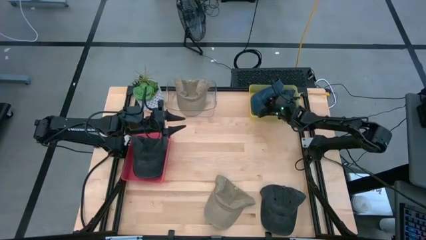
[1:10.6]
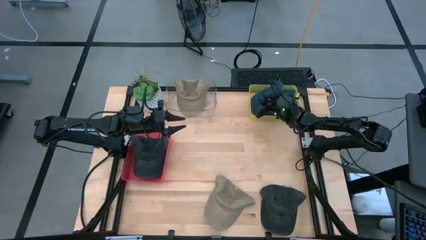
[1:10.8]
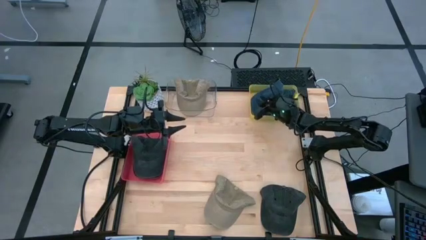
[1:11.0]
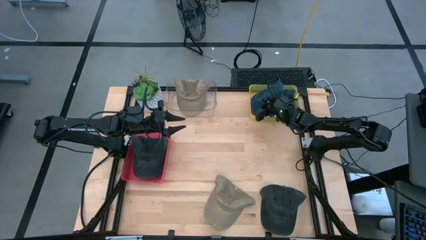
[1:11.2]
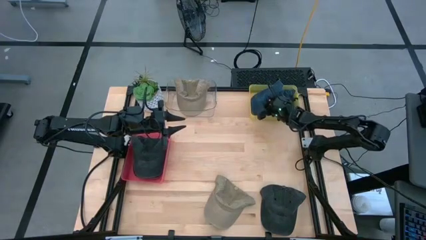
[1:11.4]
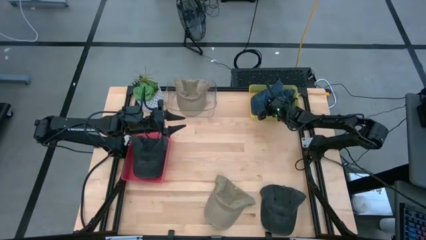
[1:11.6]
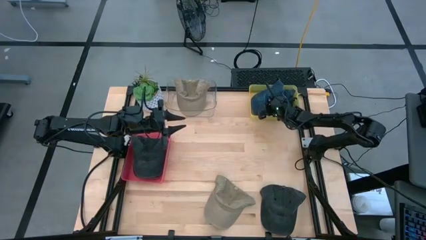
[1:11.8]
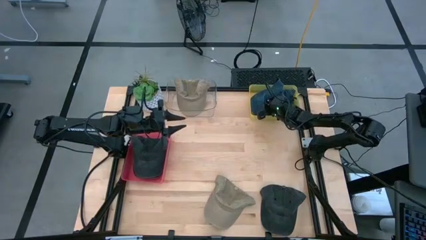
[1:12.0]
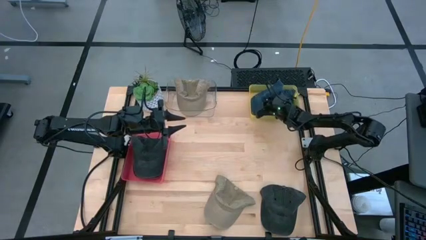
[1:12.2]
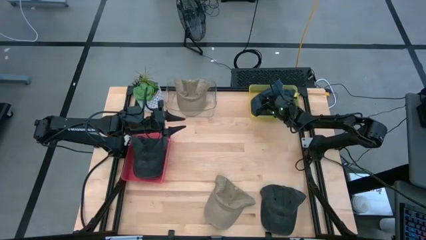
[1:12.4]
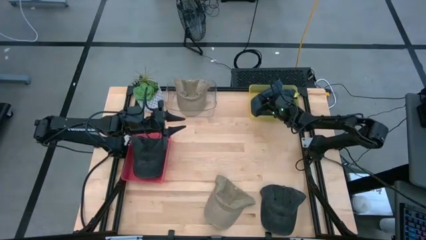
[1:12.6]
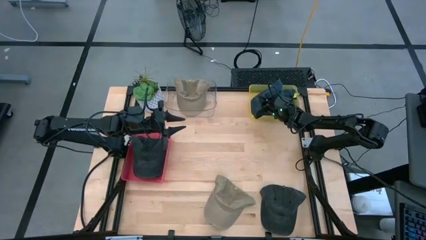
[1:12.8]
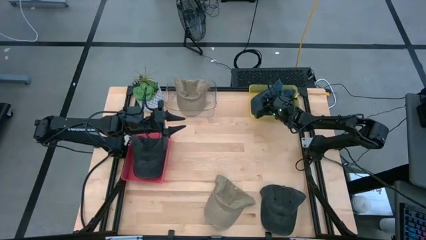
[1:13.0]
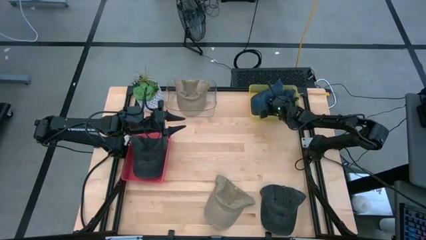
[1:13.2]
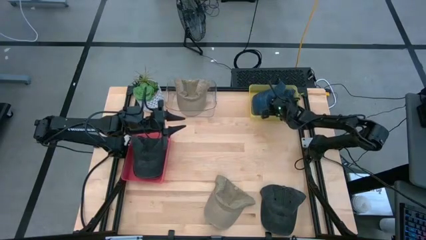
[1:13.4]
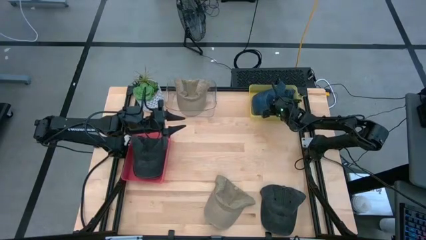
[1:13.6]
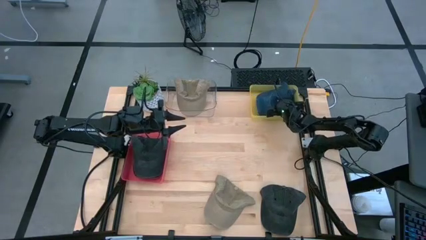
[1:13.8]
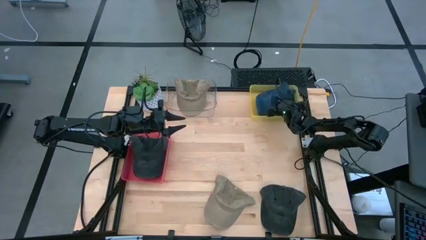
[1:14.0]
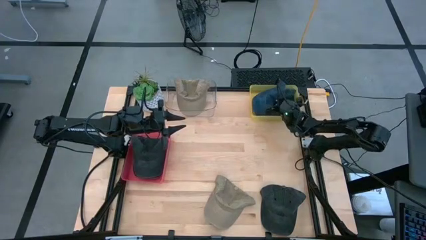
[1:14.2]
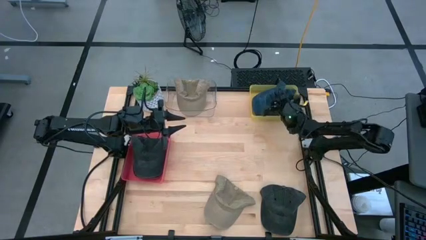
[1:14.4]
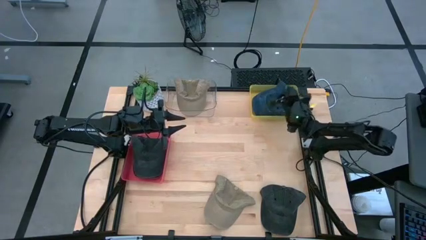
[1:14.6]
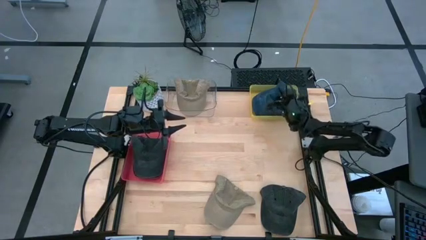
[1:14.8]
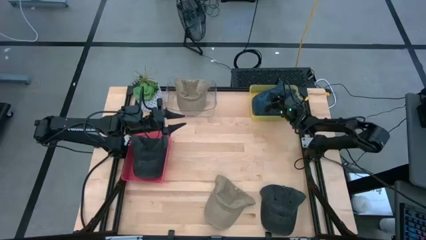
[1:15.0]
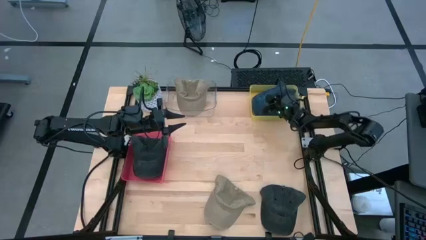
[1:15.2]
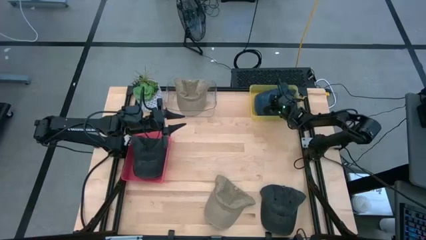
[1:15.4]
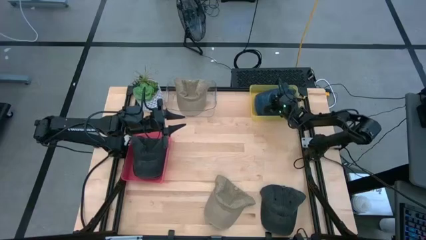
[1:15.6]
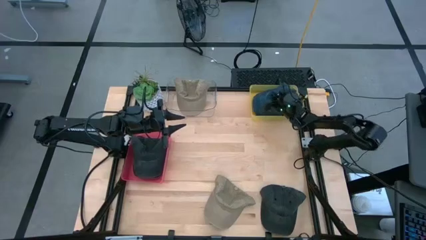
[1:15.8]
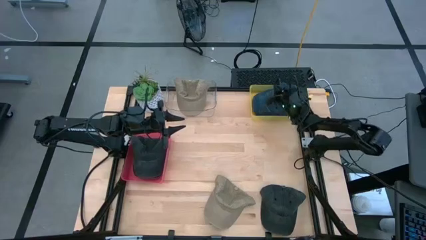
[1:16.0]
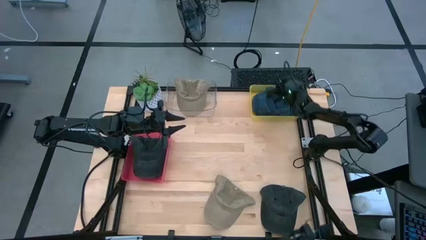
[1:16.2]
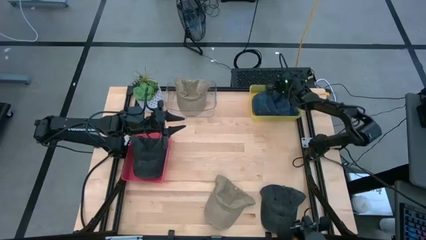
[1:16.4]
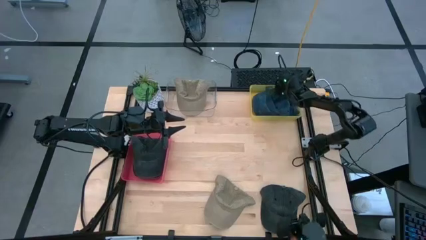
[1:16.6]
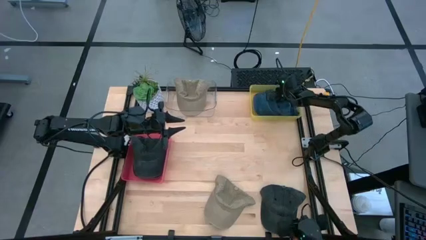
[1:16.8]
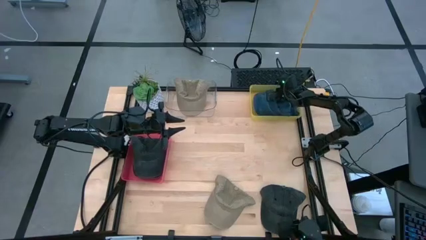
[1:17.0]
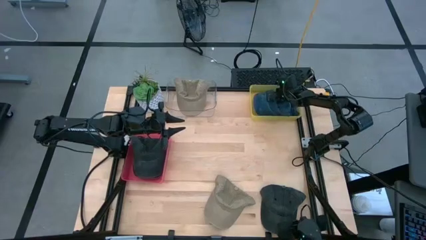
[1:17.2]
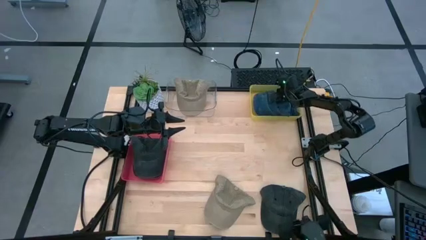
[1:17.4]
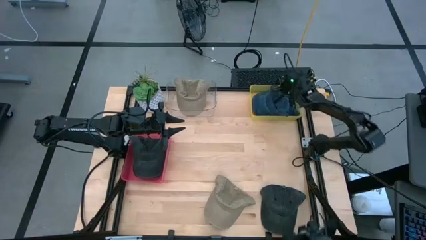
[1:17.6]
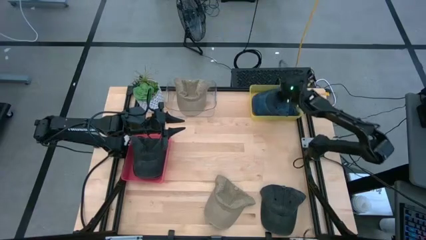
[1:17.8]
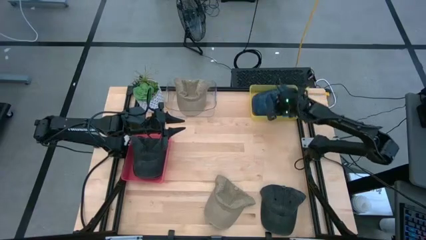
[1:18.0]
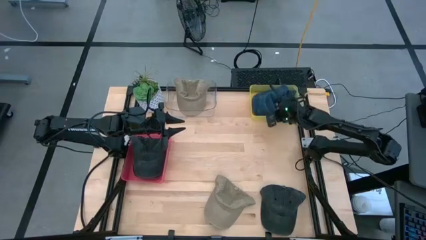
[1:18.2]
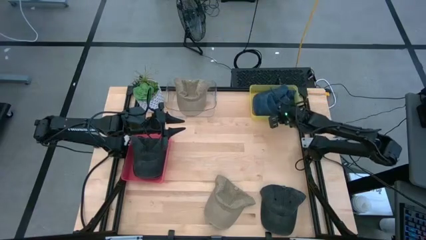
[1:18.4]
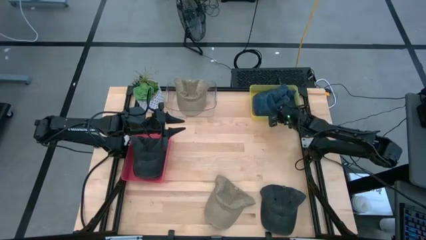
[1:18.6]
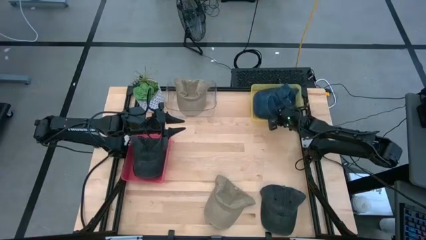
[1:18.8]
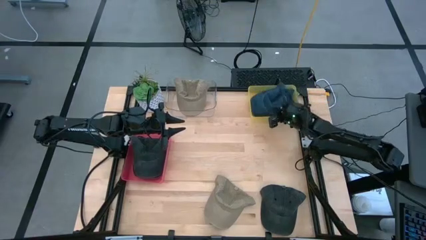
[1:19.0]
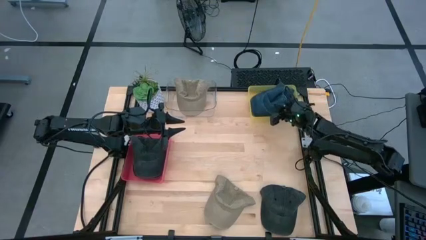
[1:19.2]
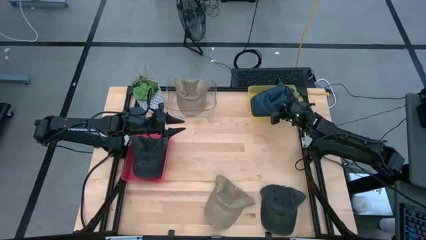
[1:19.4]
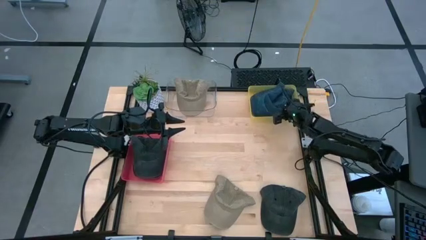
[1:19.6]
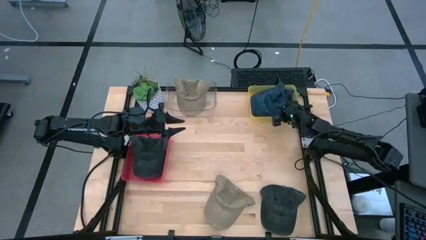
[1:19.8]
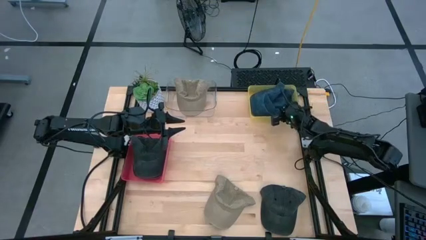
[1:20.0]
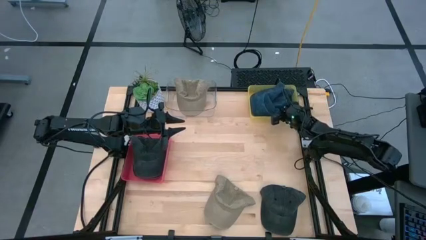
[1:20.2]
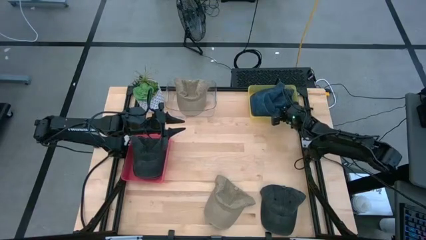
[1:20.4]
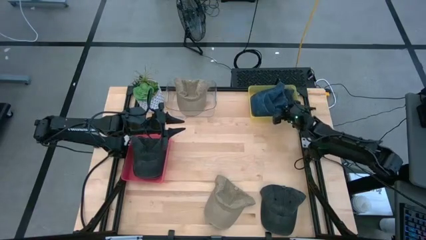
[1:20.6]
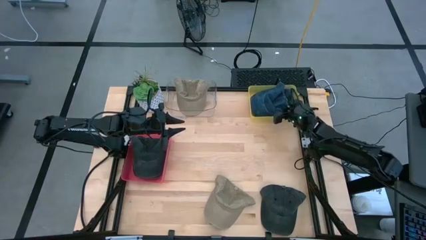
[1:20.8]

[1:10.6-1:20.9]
Task: Pick & Place hat
Put the blue cap into the yellow bin

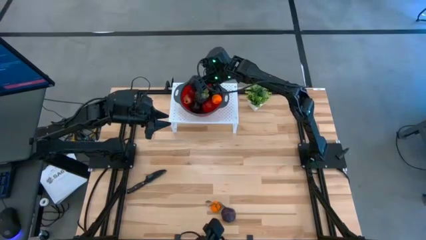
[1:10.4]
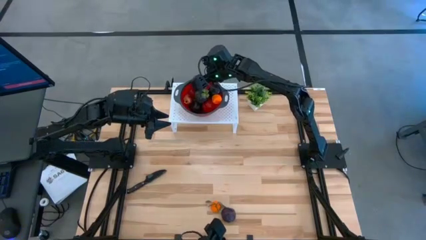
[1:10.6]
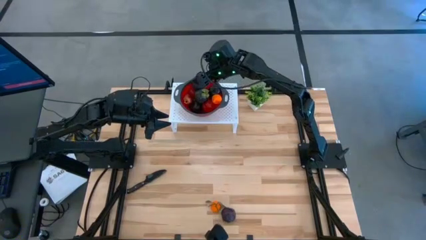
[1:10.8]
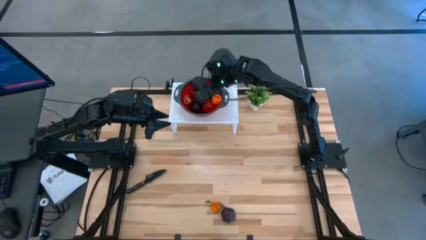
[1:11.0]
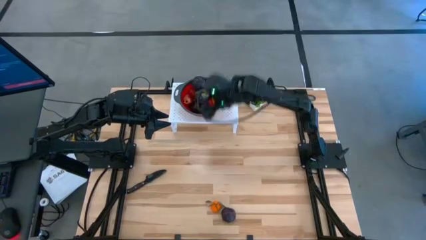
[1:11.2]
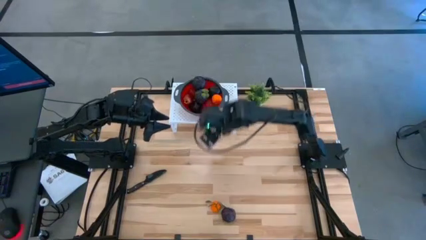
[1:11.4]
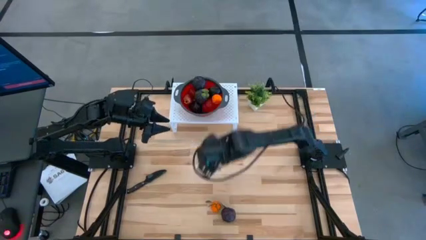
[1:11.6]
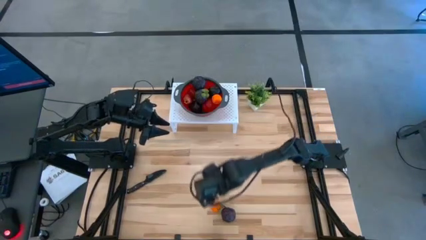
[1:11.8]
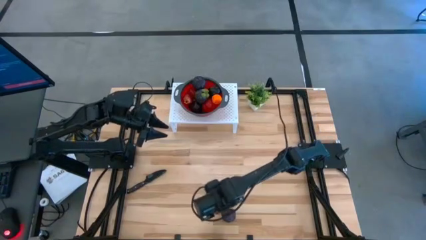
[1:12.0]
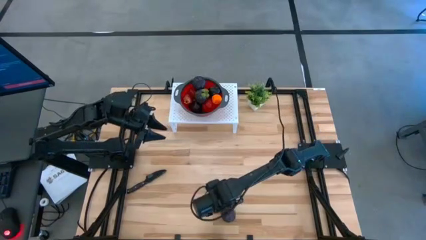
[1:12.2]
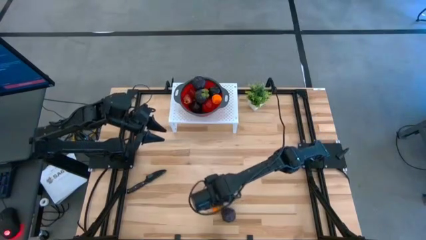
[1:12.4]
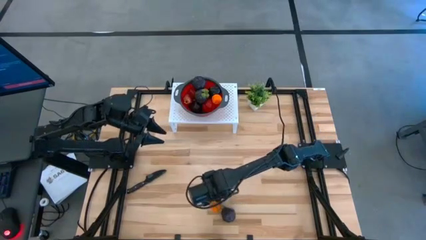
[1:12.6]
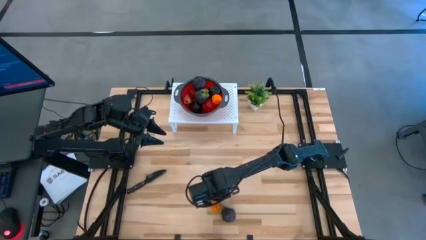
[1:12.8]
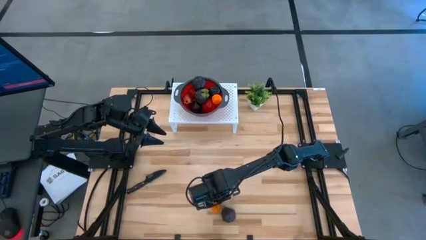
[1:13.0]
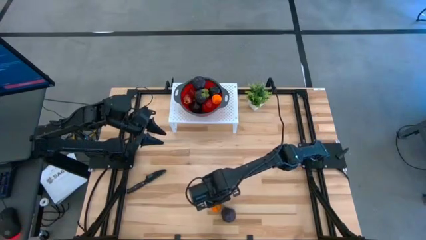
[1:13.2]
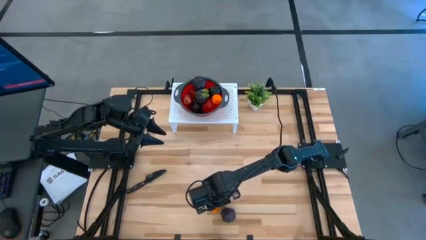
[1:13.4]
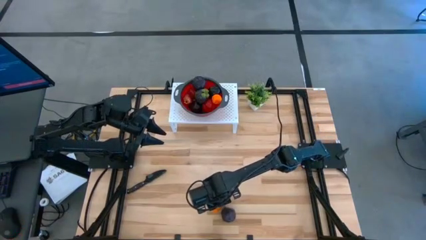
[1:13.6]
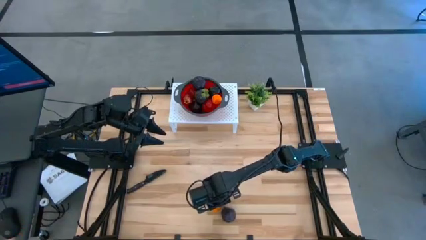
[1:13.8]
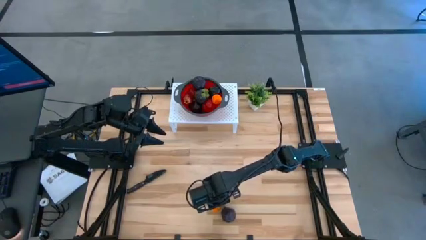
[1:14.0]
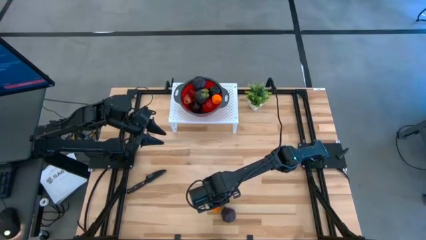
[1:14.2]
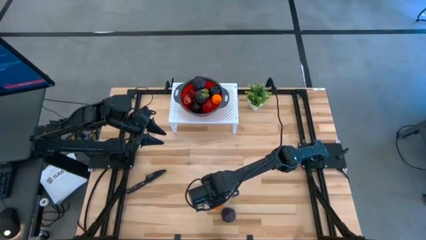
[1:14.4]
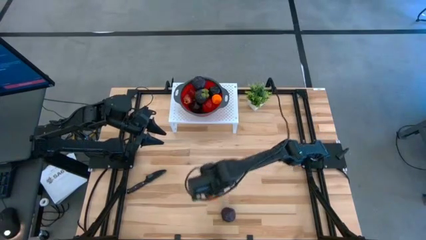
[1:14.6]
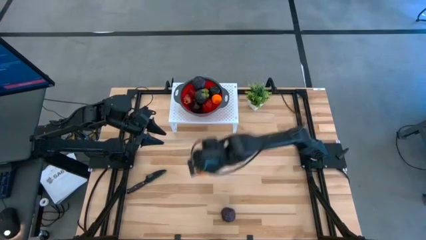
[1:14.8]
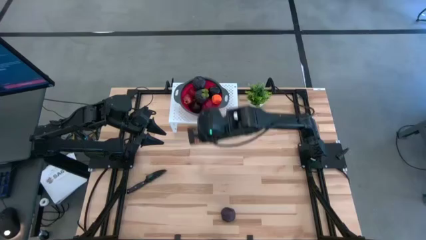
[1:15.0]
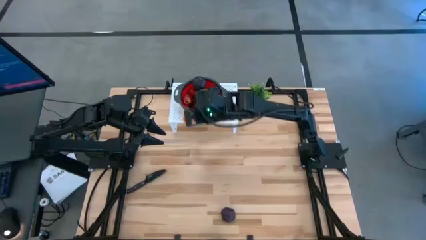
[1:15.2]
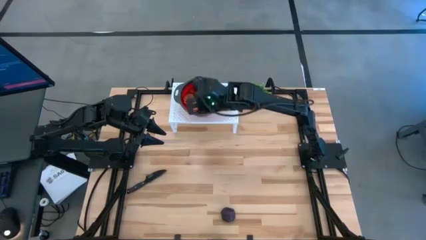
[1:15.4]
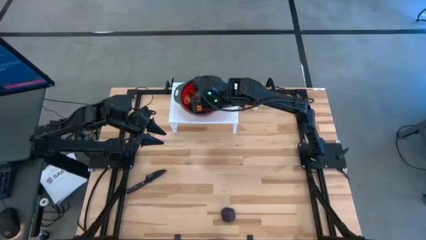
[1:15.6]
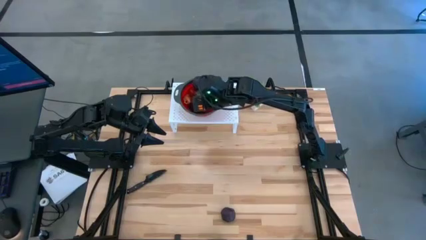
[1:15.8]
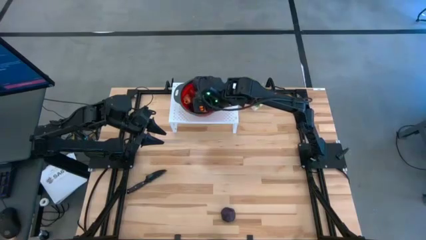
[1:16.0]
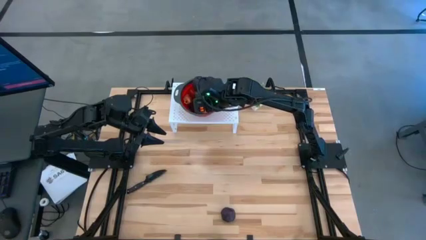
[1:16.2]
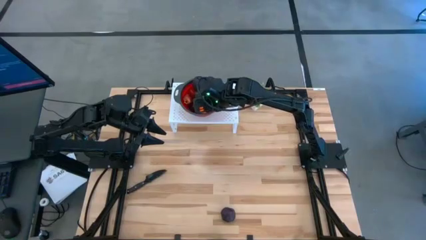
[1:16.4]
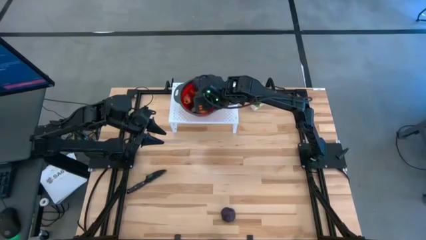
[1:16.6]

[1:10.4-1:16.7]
Task: Pick & Place Fruit
Put the orange tangerine into the red strainer bowl on the shelf
